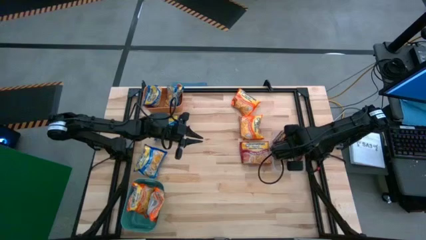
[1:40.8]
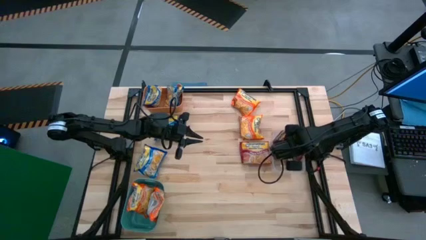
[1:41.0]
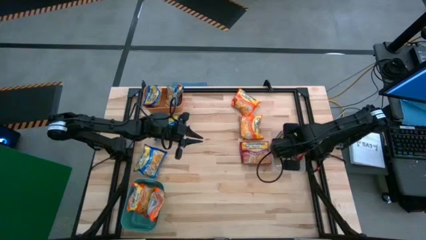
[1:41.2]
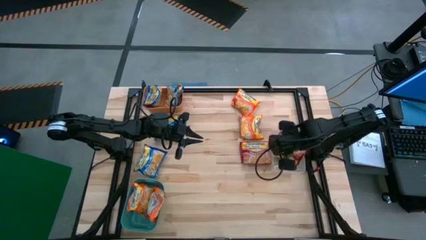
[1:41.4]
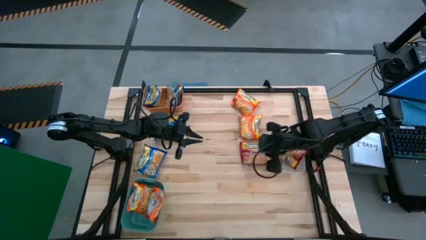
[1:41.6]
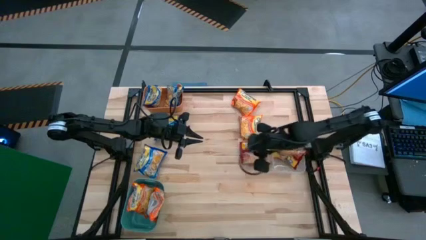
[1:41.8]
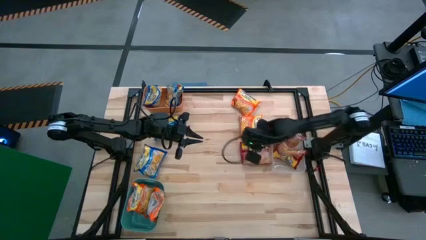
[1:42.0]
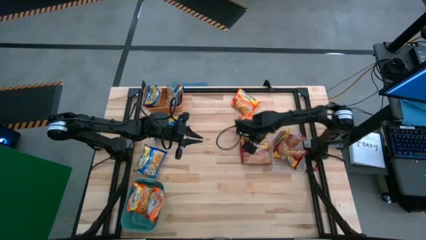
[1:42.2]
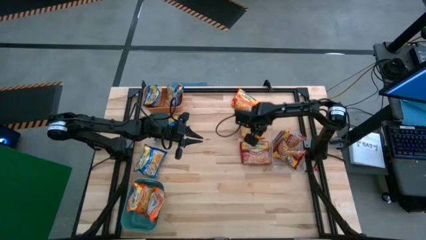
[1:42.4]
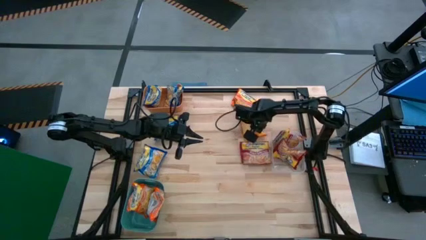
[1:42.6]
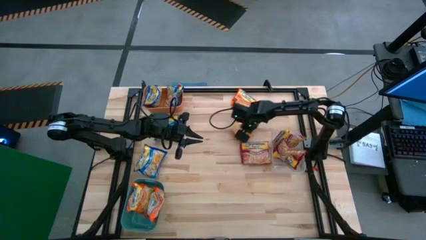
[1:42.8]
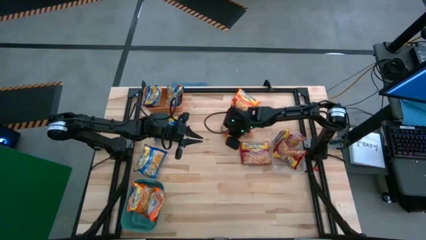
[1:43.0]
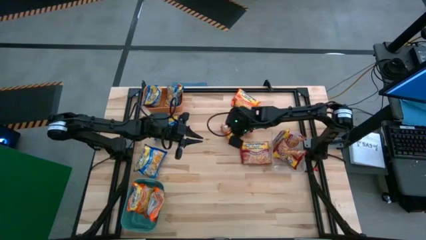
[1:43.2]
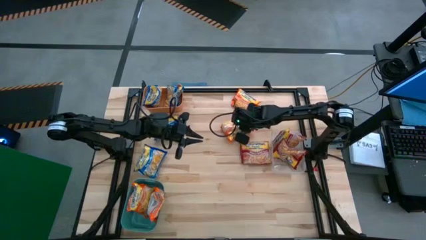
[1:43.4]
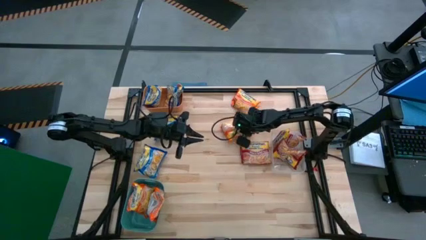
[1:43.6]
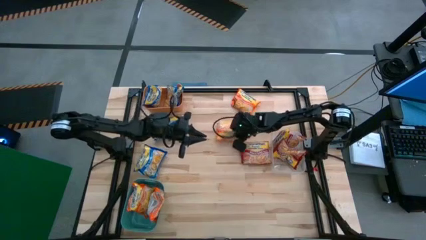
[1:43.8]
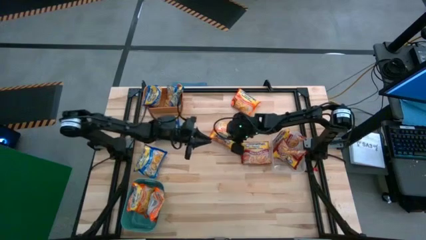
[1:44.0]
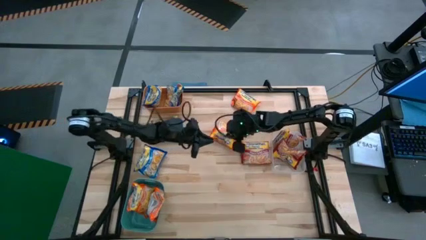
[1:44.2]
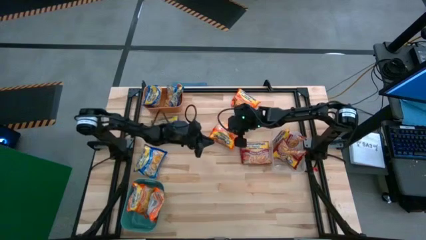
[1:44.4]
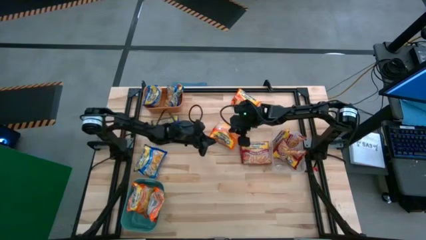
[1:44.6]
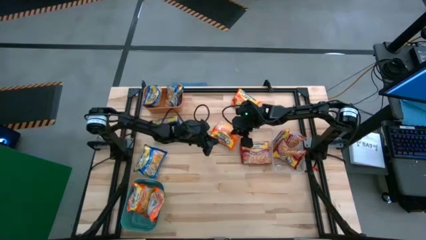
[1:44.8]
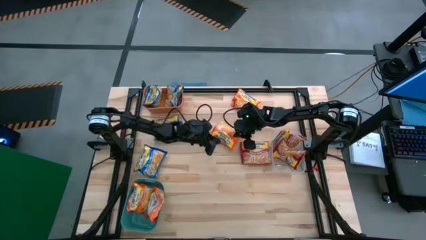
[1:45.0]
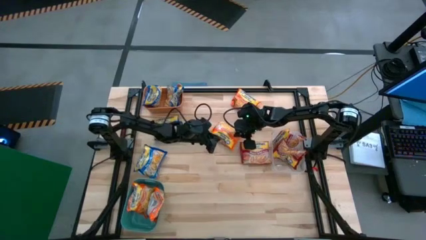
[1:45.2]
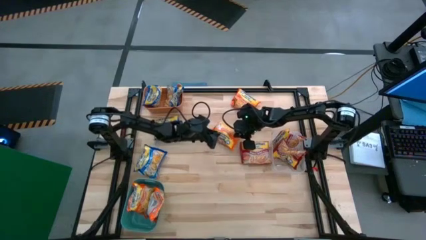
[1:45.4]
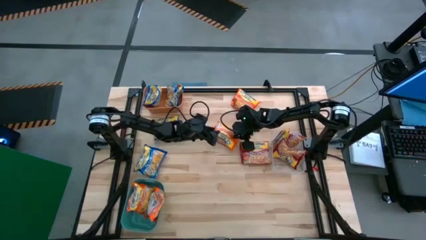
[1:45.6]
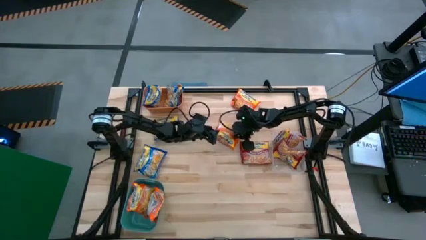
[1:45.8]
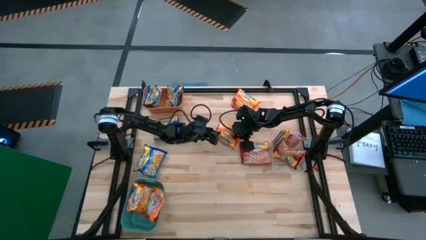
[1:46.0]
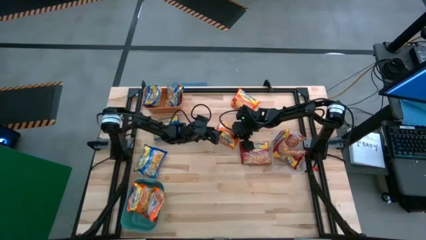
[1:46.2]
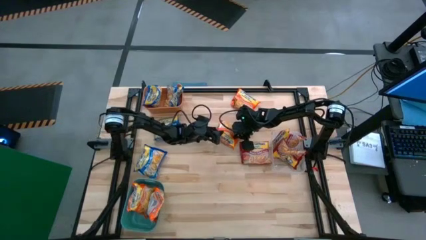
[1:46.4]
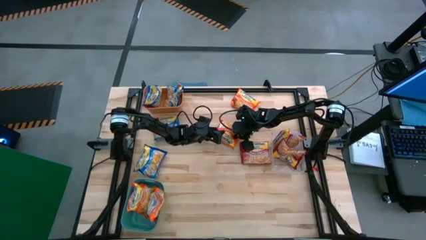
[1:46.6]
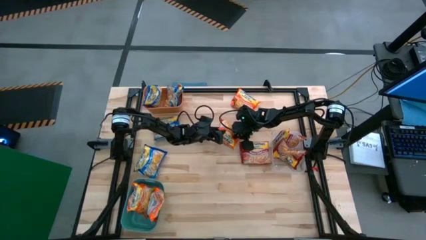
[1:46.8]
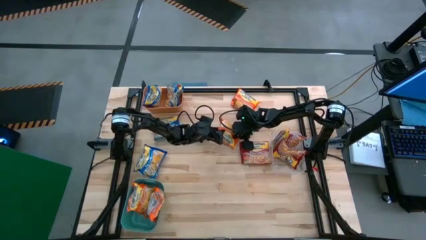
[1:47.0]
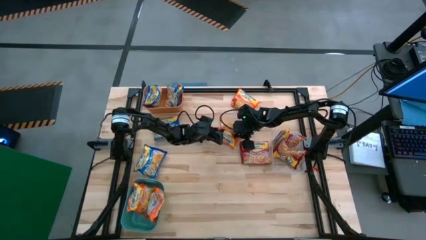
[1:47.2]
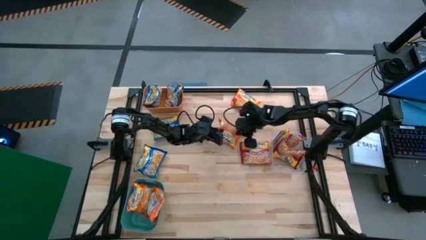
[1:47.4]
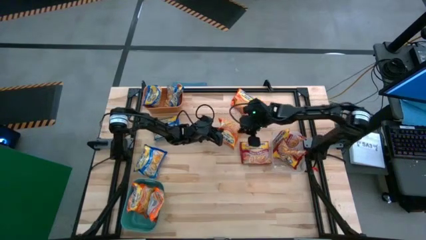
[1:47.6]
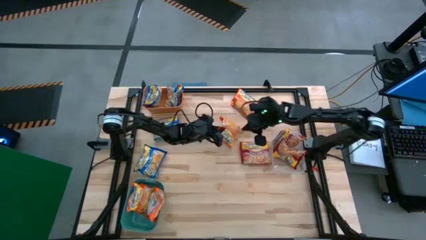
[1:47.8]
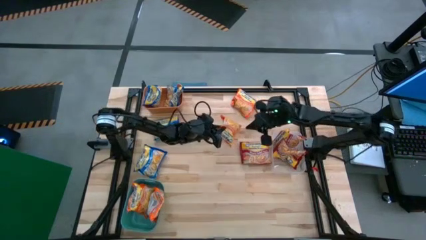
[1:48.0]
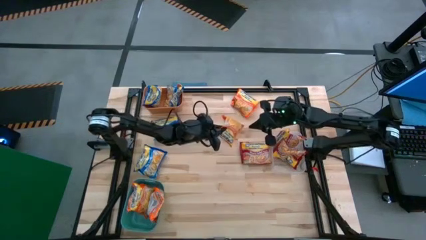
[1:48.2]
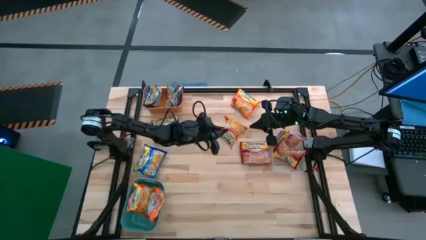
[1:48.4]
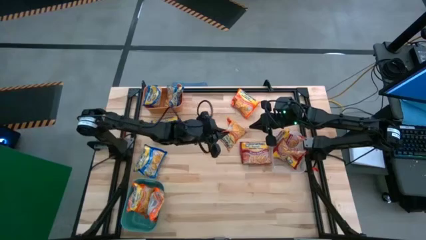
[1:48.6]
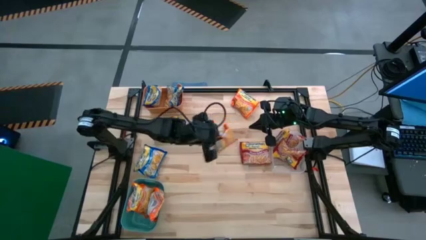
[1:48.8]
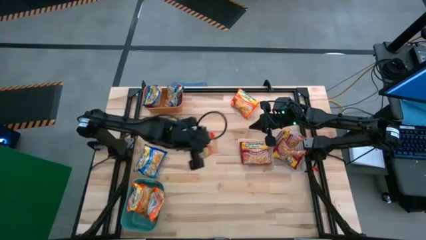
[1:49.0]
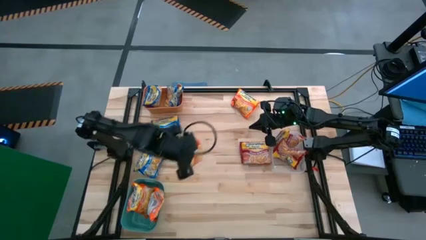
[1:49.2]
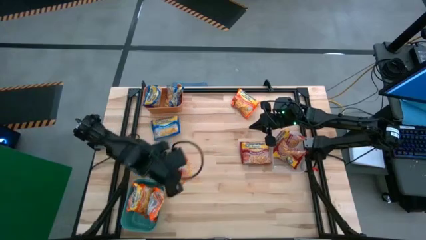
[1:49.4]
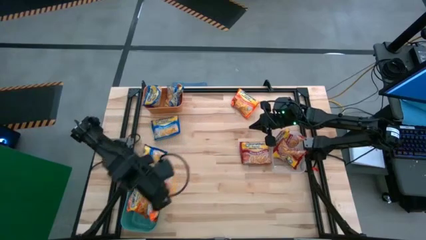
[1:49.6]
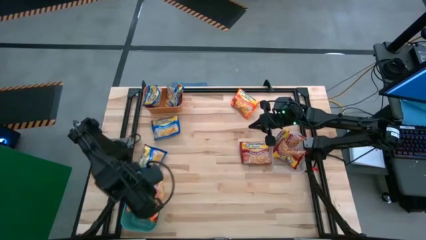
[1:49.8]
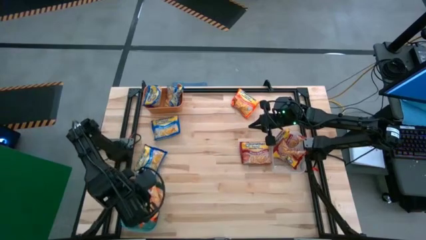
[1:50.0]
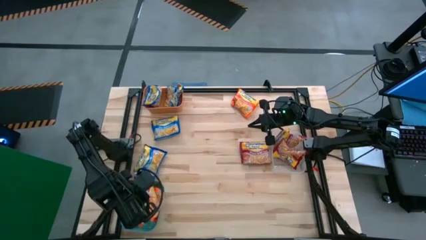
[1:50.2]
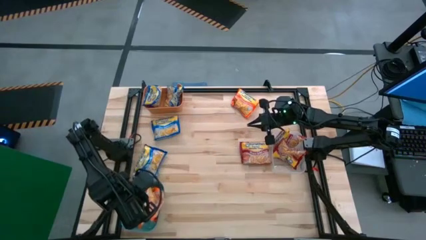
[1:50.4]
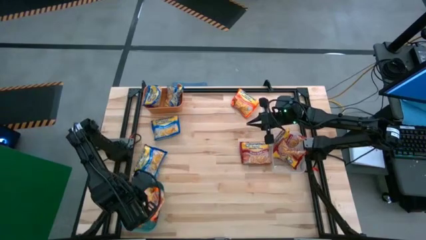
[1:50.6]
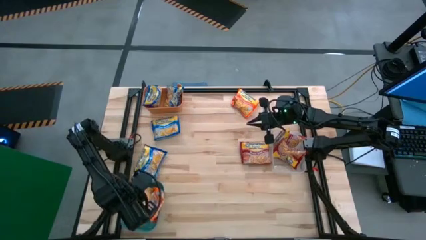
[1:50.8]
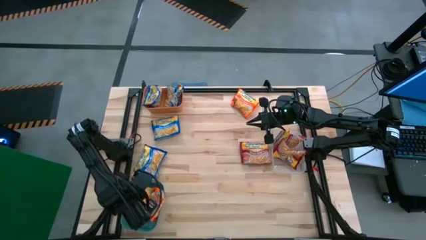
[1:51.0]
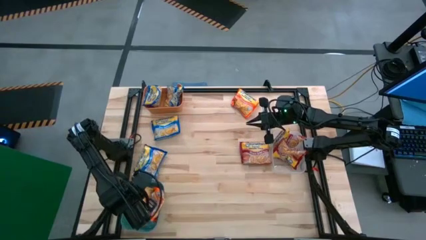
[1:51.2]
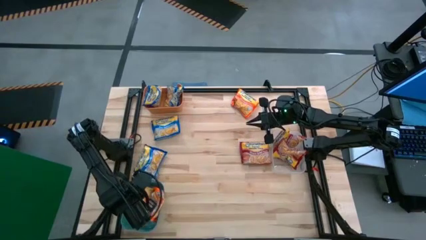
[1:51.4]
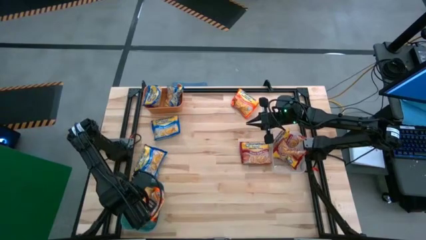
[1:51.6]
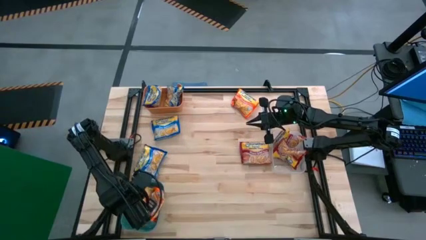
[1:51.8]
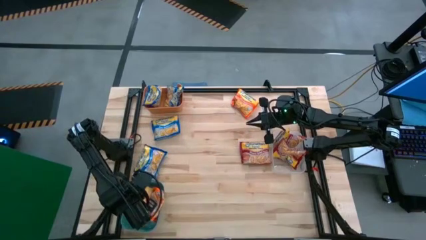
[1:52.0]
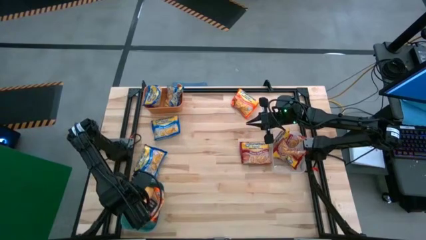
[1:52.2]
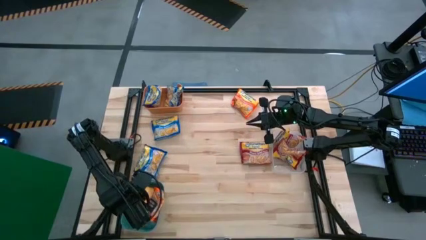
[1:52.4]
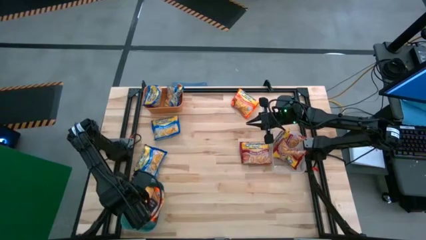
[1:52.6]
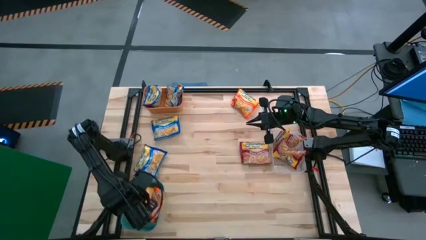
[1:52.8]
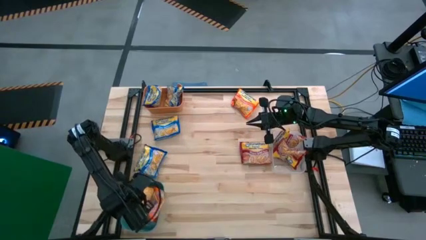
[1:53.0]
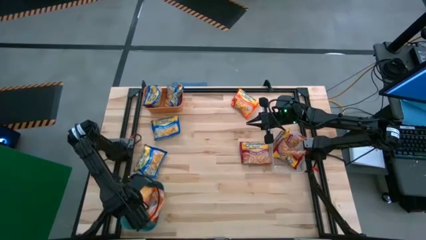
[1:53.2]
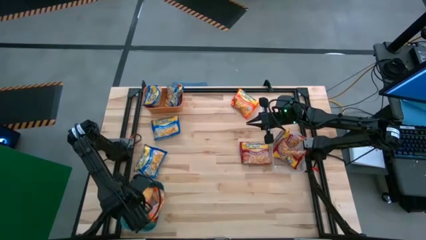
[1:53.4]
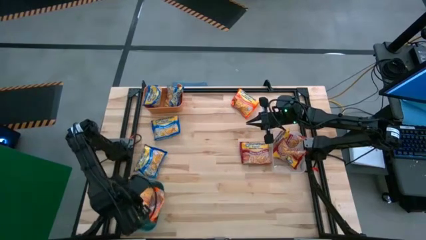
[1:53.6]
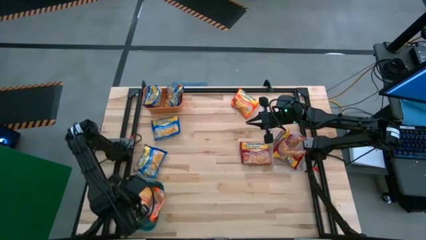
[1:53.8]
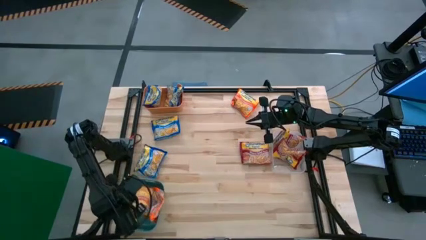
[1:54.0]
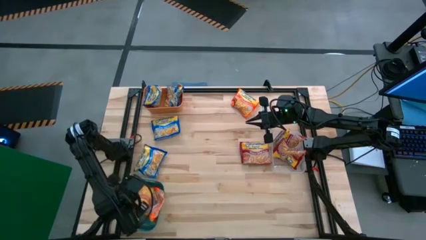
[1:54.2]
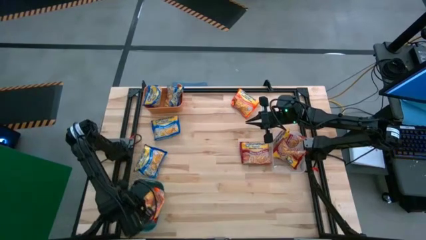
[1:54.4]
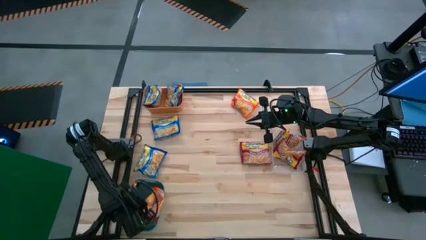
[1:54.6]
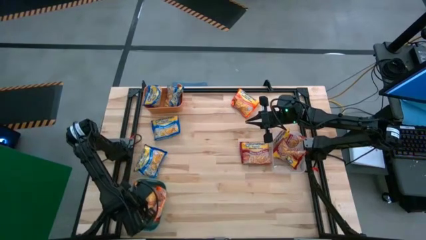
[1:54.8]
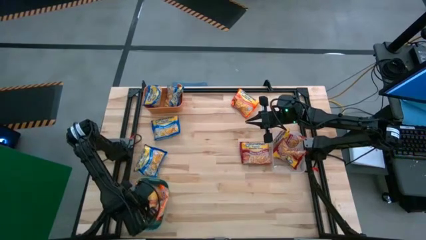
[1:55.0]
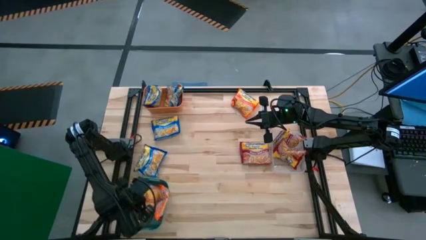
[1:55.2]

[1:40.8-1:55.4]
Task: Sort Maruchan noodles
Put the orange noodle pack into the green bin

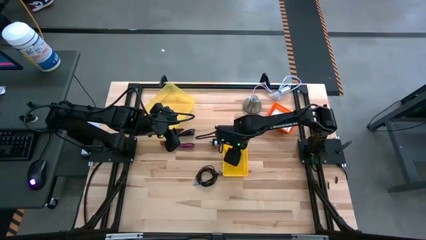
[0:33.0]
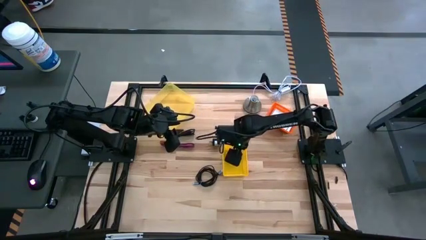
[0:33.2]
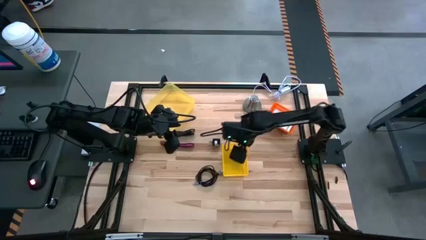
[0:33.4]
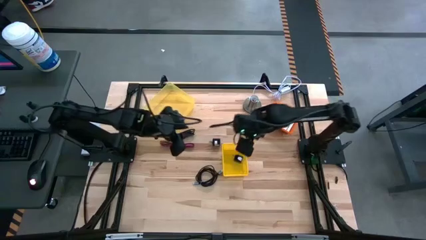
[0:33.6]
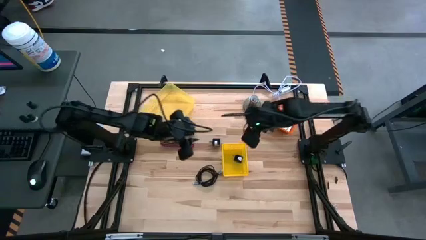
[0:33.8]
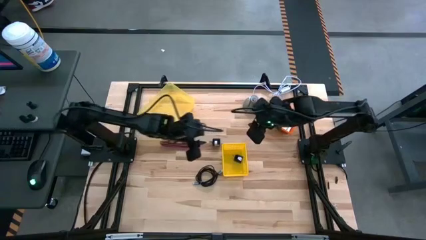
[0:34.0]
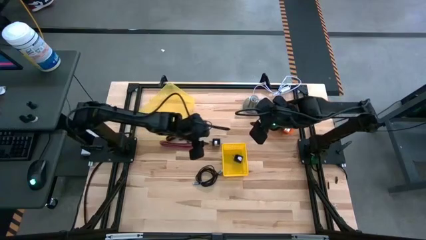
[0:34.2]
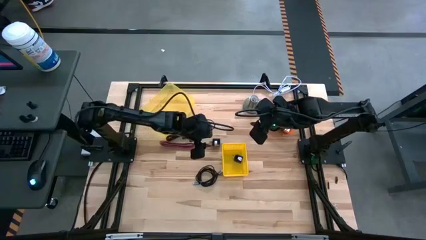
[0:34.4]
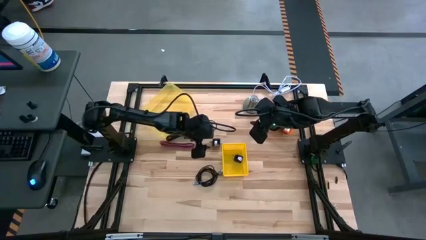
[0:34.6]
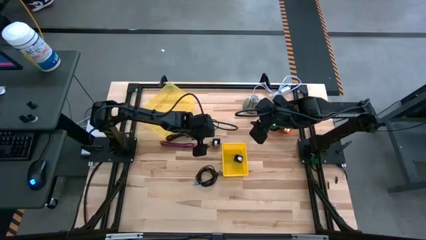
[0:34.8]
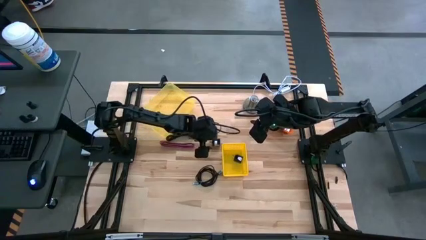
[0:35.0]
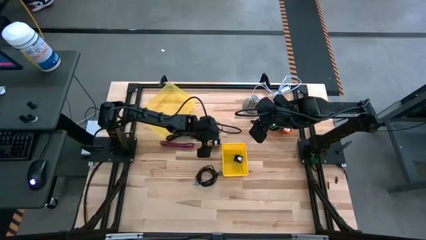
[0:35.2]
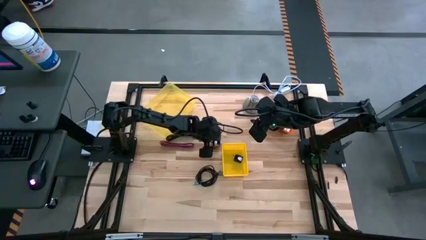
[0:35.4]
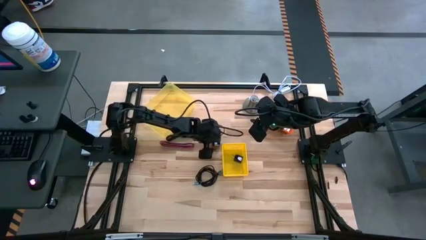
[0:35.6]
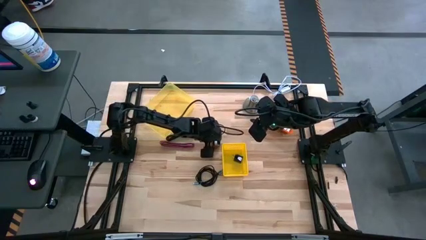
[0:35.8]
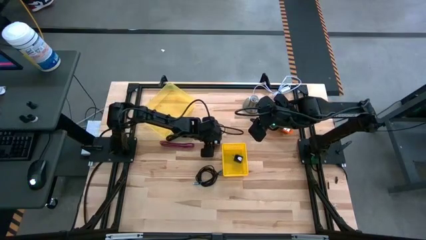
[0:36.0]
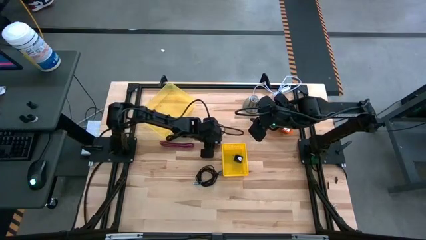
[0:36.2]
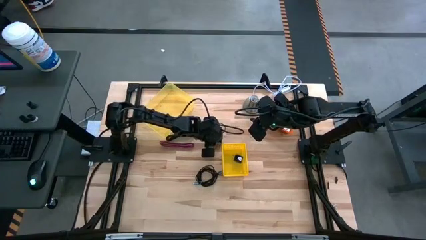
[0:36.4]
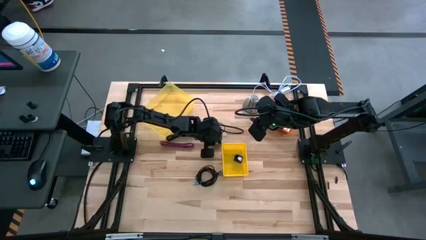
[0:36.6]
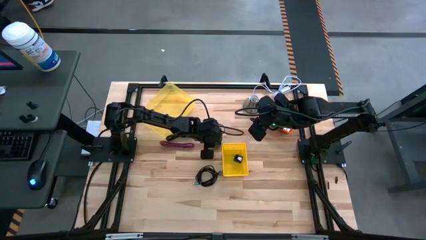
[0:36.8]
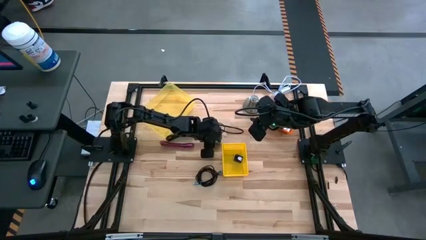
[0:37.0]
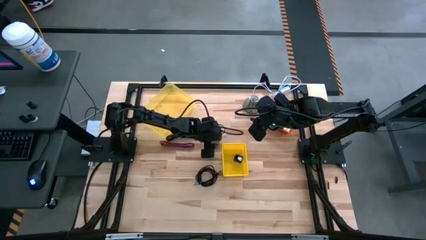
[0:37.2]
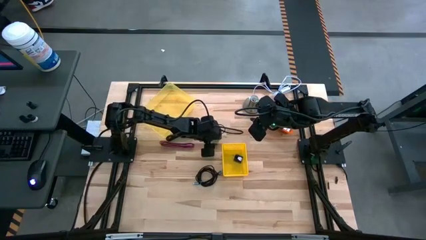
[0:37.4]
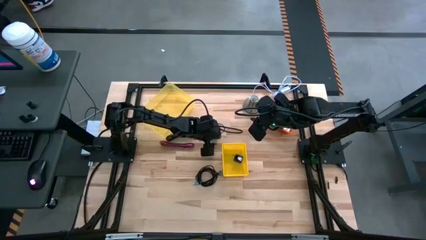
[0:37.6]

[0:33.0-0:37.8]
Task: Pick and place items into bin
Put the black charger adapter into the yellow bin
